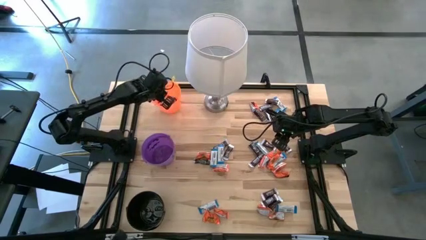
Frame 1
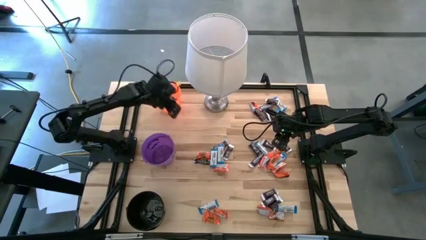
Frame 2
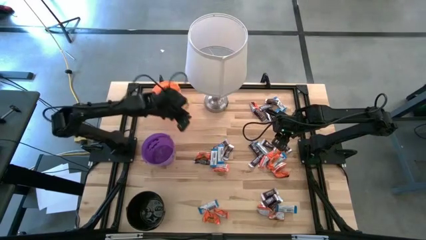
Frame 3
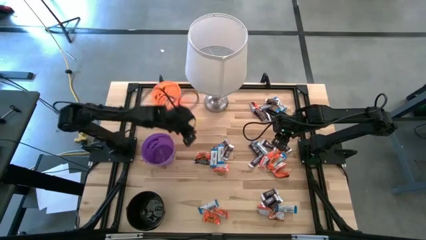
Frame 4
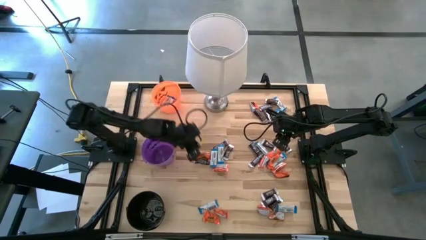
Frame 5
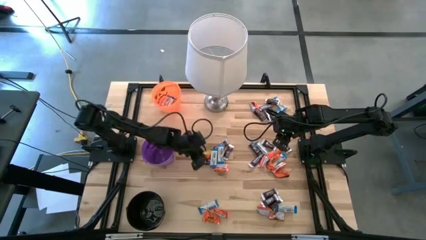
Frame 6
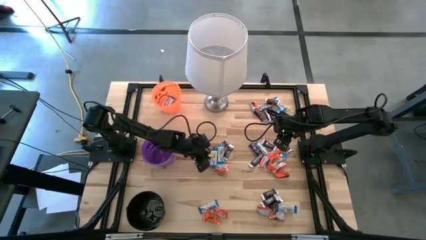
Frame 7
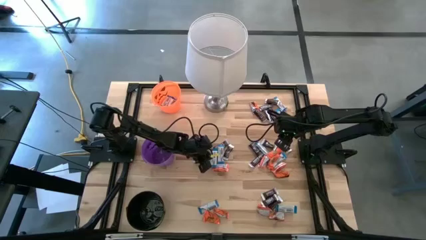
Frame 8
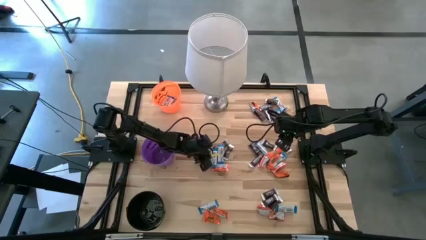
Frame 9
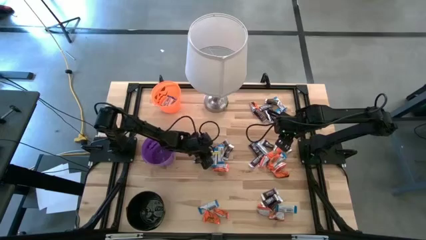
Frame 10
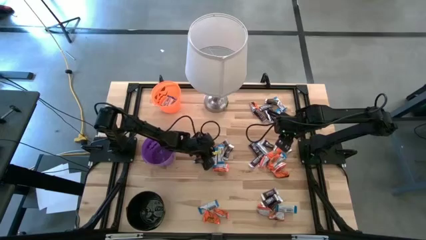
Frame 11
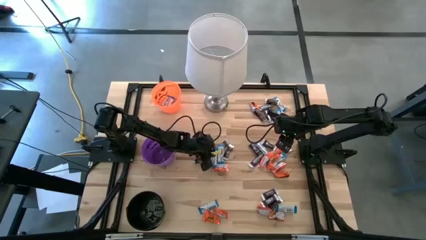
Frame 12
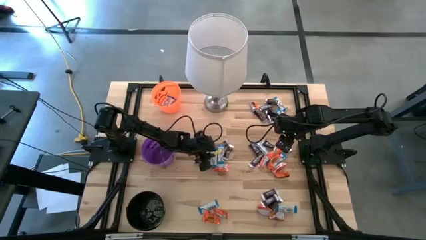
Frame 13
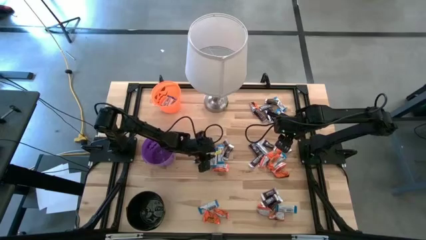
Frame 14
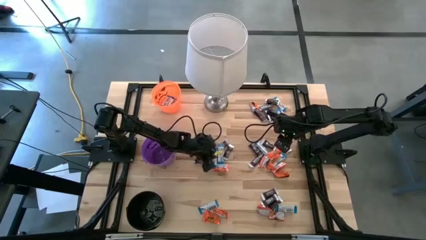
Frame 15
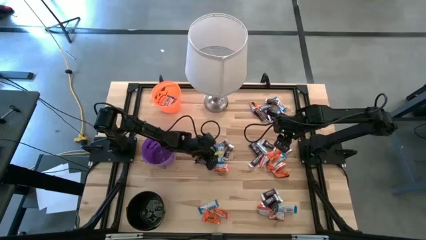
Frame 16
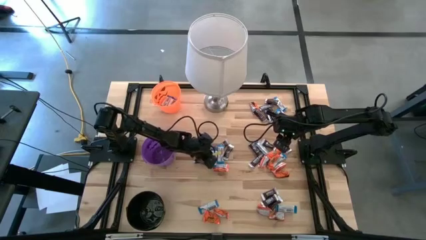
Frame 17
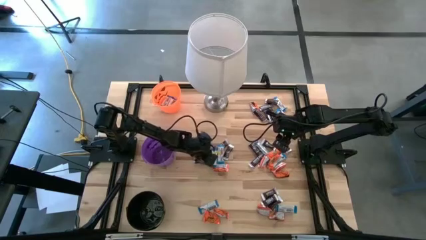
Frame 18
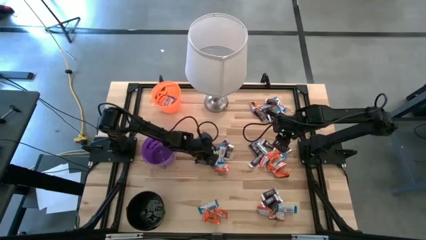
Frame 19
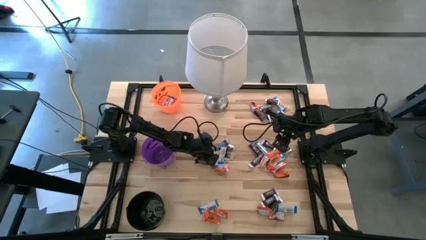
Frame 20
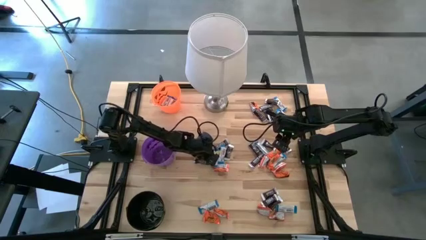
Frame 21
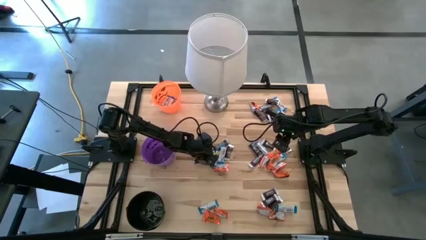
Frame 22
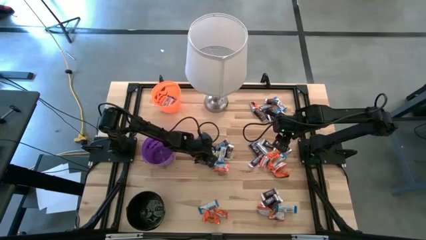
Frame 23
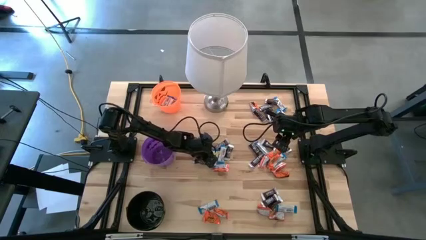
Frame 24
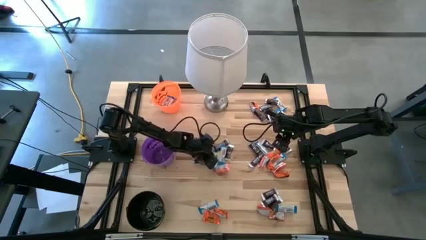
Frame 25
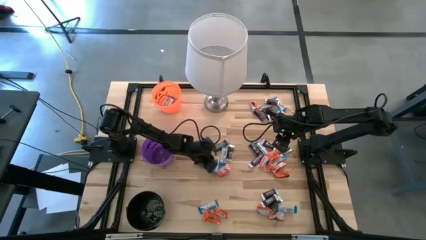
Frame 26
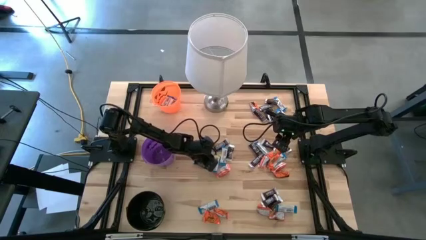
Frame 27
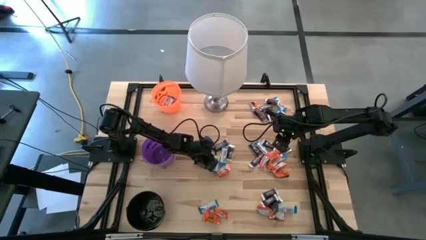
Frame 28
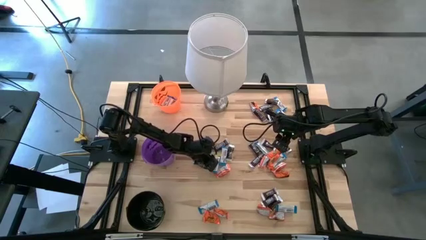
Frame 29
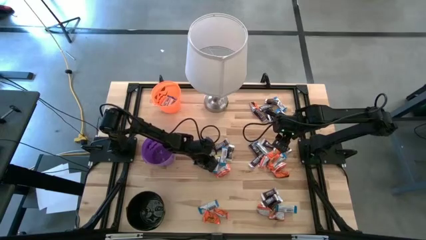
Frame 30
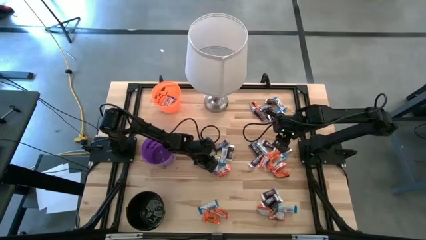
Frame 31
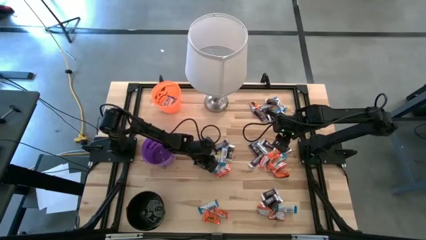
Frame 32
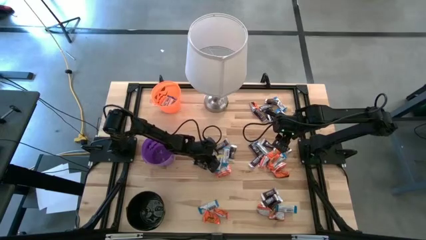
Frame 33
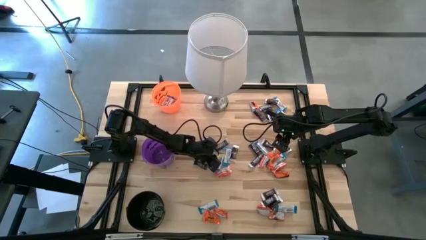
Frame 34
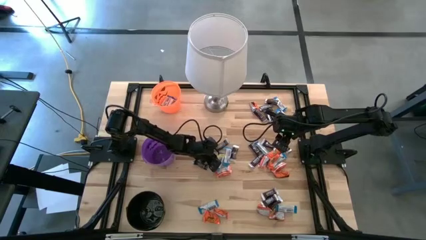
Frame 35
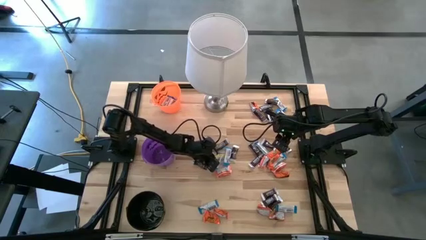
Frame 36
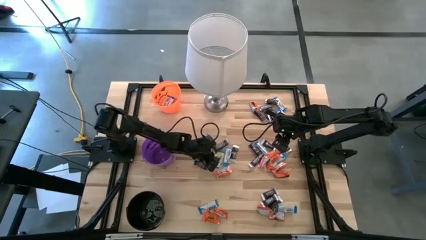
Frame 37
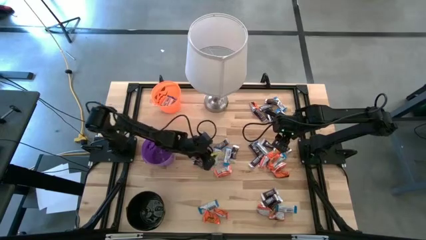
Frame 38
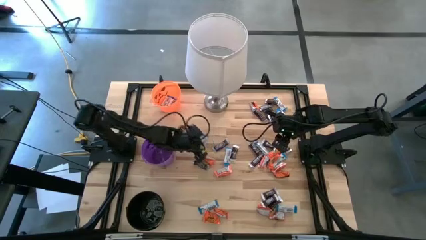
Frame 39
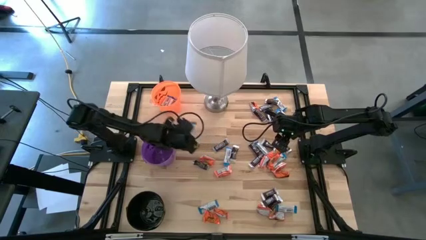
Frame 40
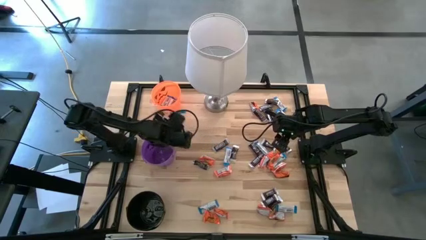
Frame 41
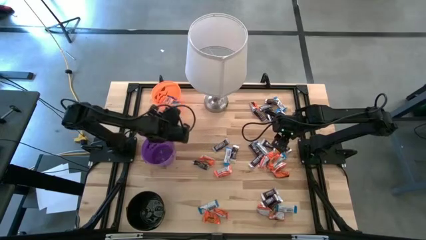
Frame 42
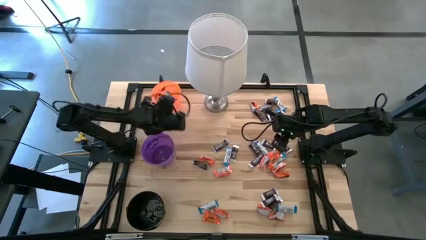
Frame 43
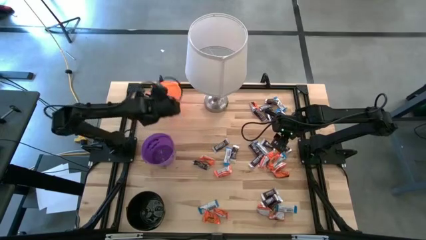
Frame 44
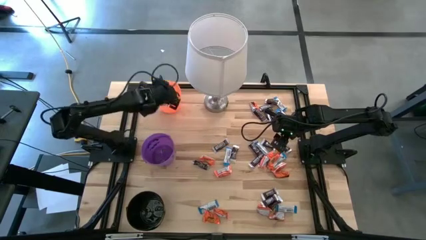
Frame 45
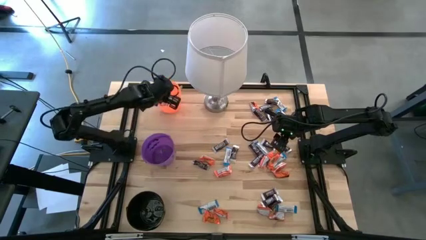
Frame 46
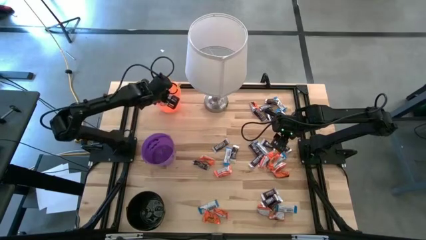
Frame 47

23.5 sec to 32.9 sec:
Task: Sort candy
Put the white chocolate into the orange bucket

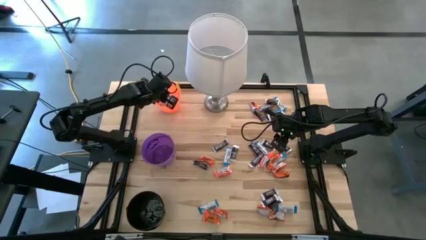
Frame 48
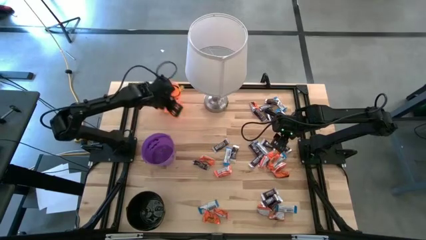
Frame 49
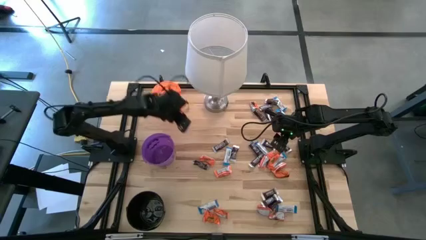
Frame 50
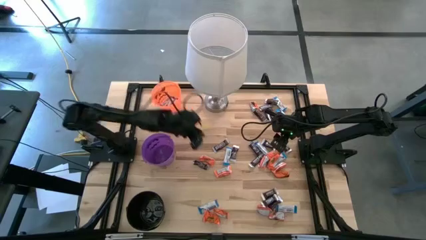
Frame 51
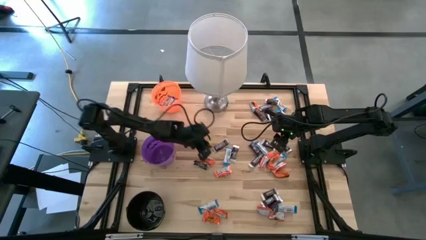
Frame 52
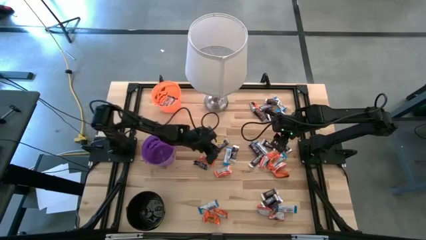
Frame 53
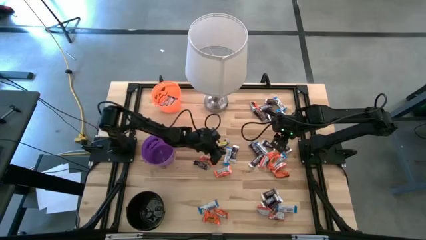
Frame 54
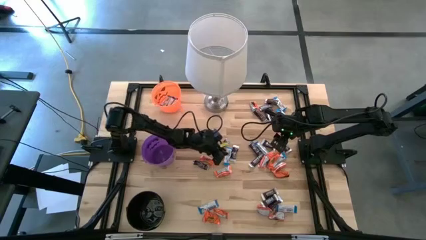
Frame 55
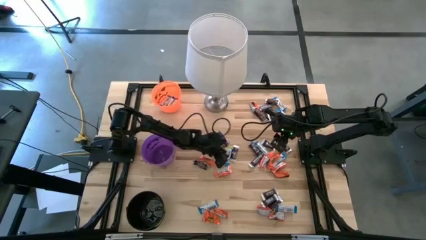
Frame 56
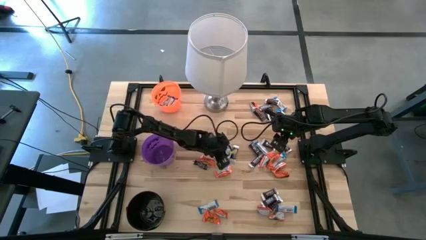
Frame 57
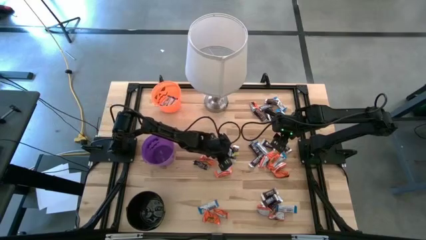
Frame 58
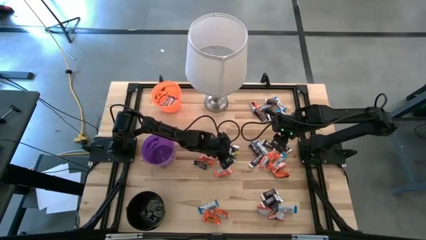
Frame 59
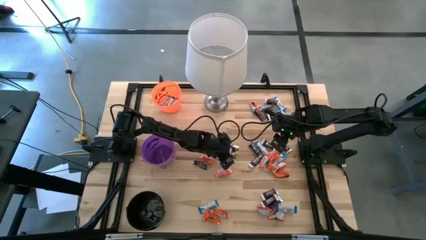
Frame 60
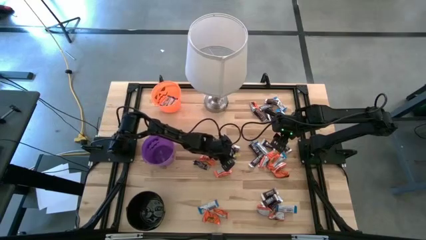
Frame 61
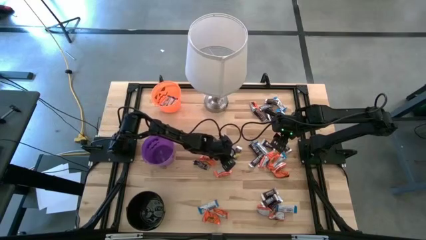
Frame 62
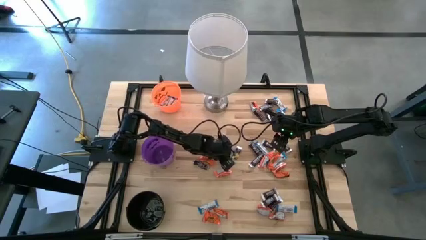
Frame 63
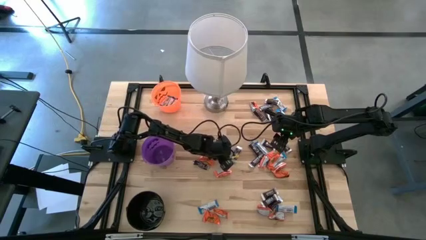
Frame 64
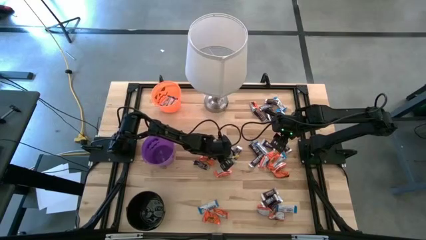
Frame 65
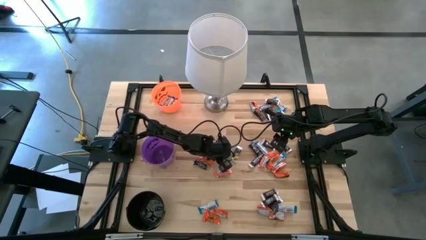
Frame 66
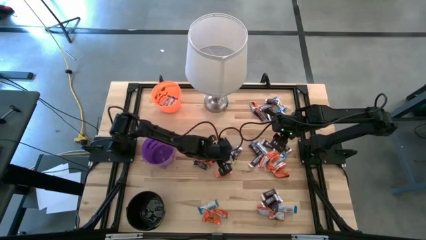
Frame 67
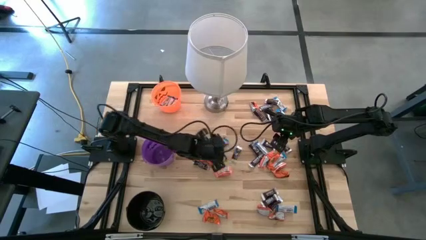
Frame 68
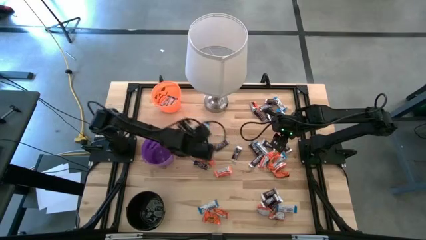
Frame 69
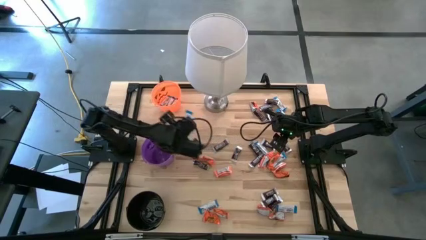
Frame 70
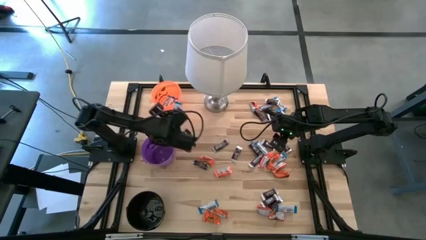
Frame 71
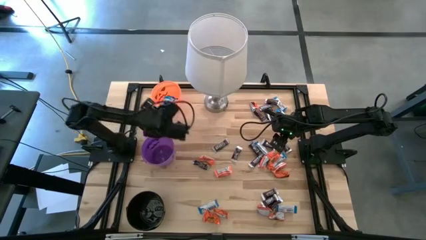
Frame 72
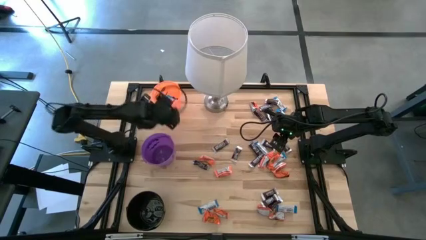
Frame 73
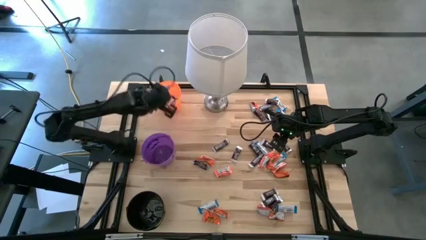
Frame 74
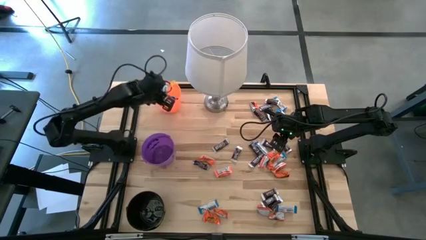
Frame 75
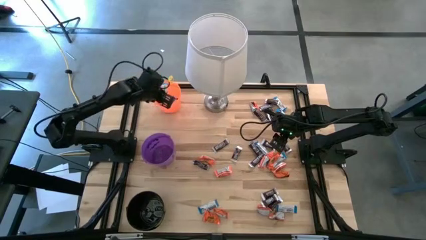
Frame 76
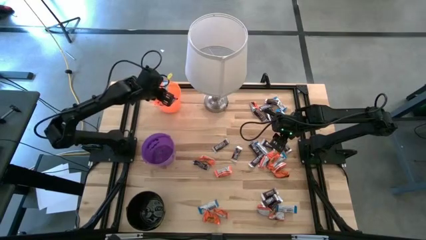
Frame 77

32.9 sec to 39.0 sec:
Put the white chocolate into the orange bucket

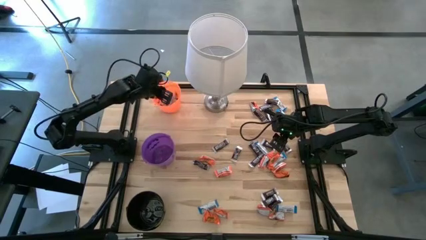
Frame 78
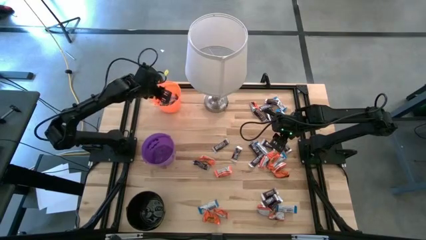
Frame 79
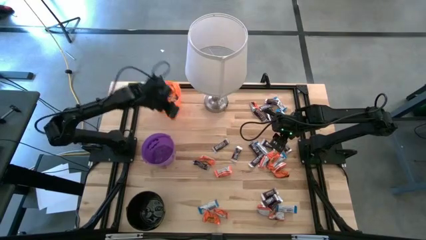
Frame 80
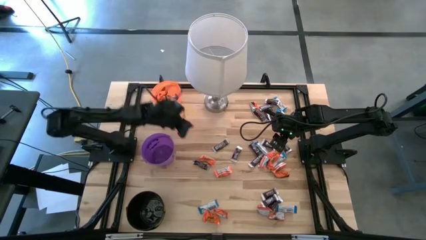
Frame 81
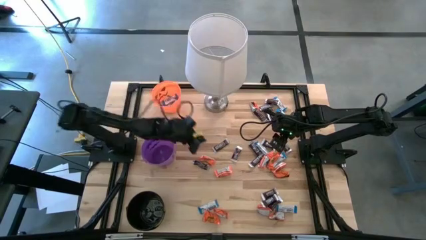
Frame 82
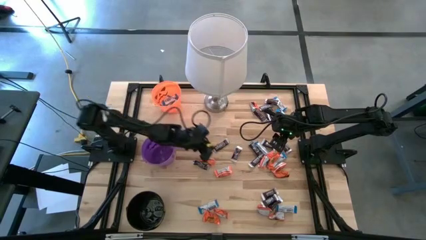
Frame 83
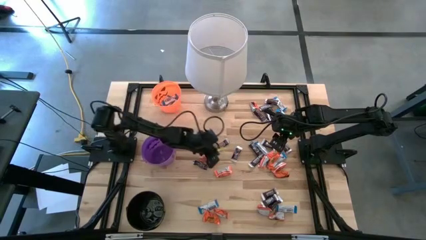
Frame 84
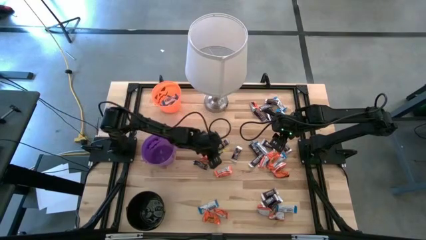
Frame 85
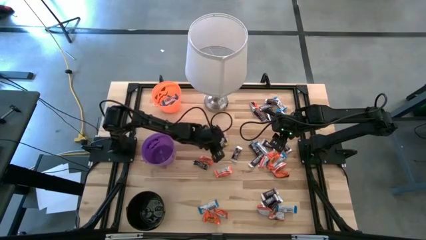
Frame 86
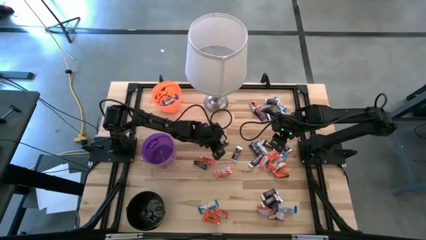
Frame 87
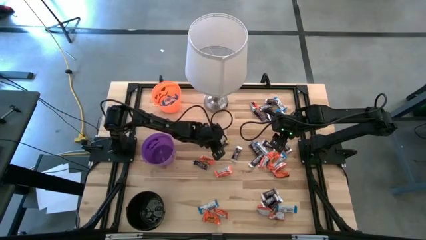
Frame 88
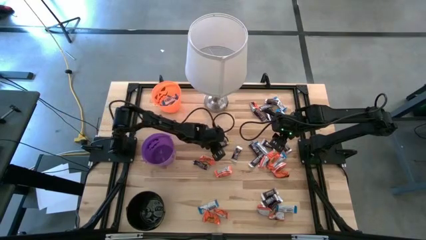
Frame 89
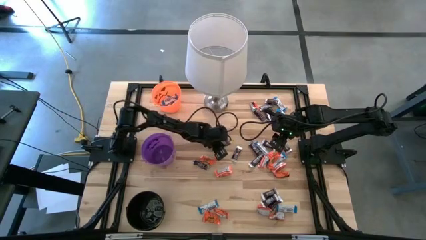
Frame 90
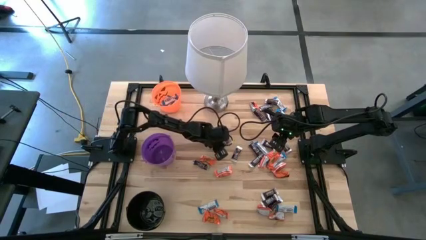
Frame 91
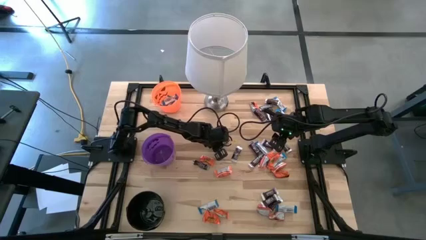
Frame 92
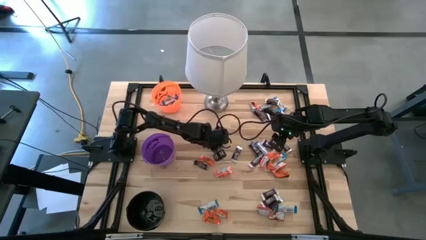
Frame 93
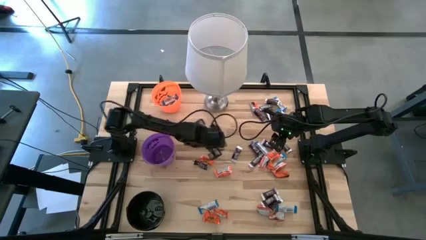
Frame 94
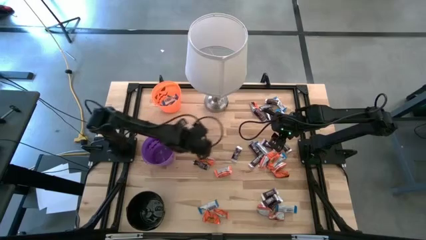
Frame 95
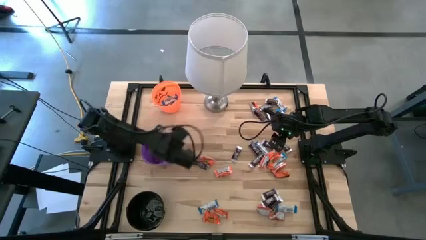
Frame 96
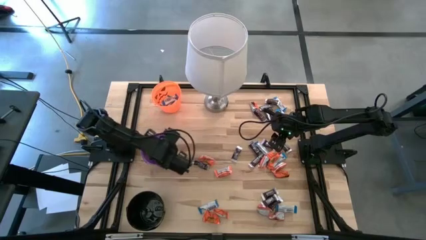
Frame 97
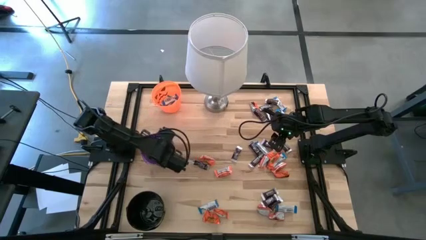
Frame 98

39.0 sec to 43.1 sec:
Put the brown chocolate into the purple bucket
